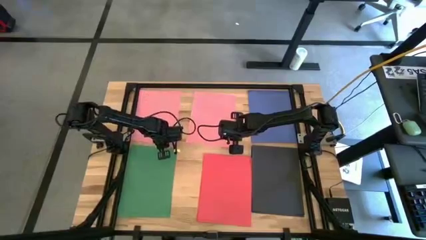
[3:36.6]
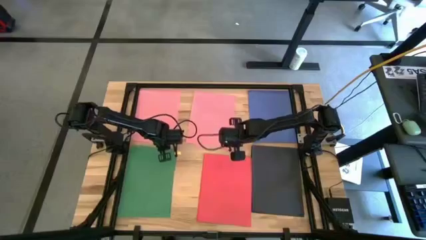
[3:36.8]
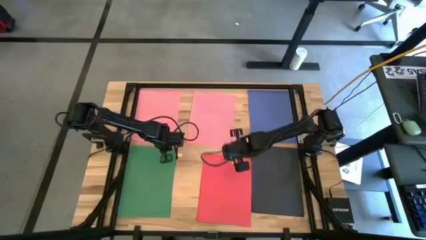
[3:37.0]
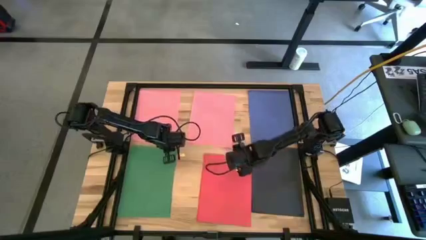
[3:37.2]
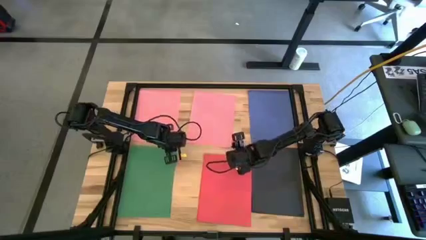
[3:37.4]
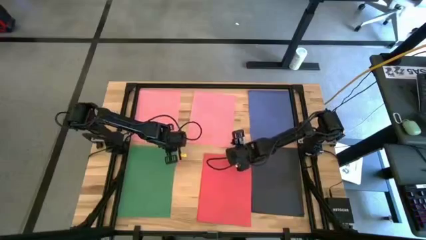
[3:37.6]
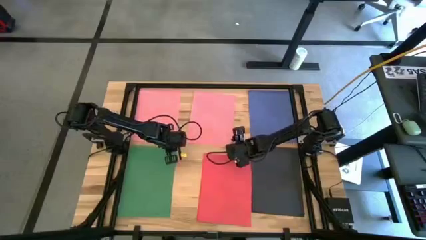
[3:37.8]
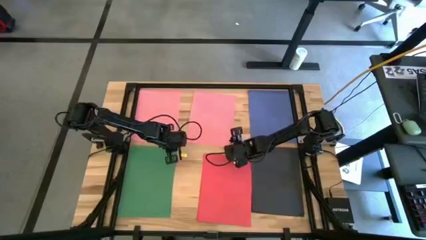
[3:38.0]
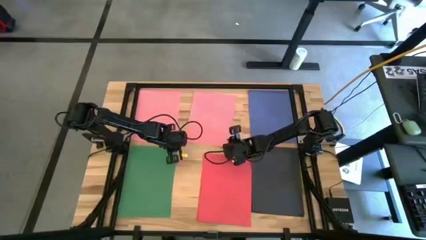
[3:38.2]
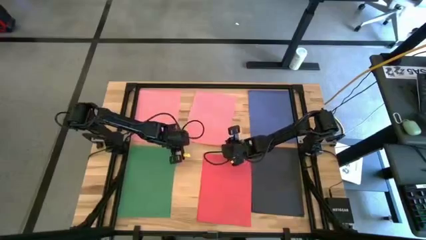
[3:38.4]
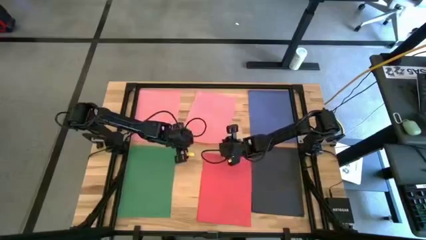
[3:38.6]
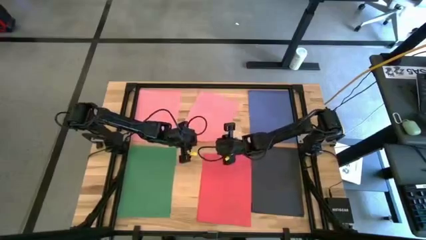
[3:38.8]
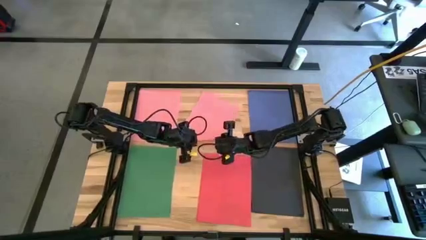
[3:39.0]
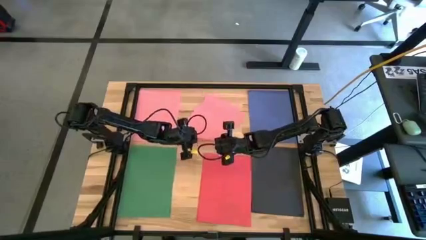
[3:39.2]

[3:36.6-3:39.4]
Task: Organize paper
Stack the pink paper on top of the pink paper

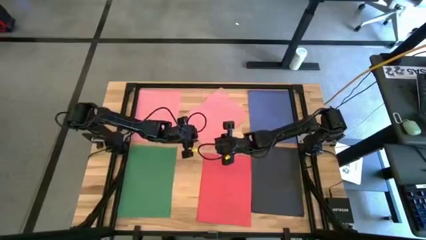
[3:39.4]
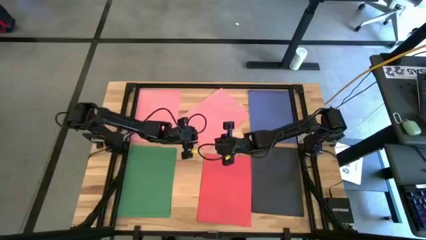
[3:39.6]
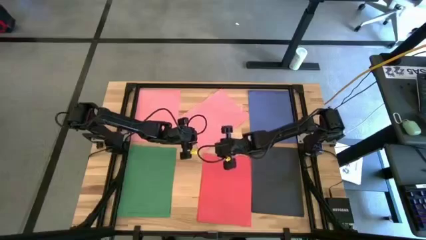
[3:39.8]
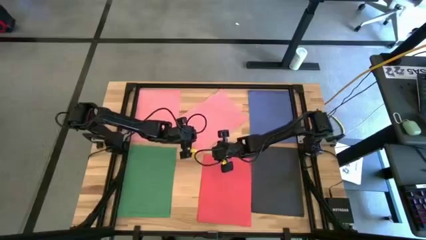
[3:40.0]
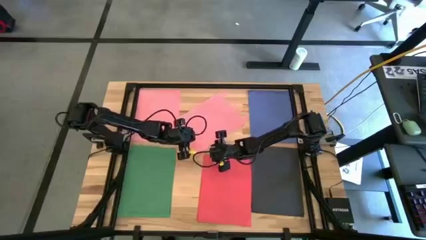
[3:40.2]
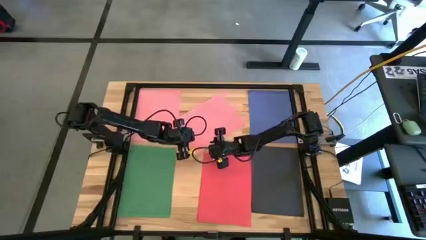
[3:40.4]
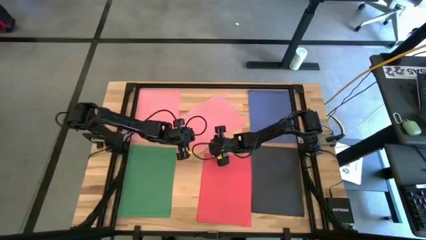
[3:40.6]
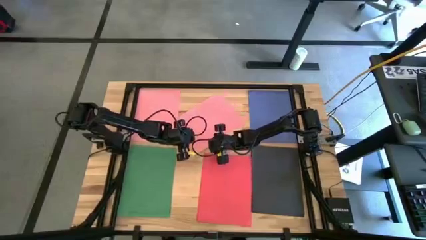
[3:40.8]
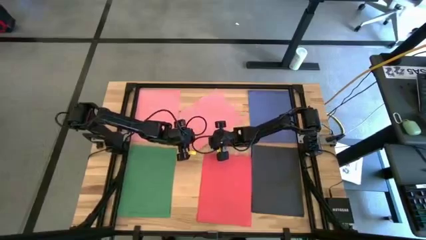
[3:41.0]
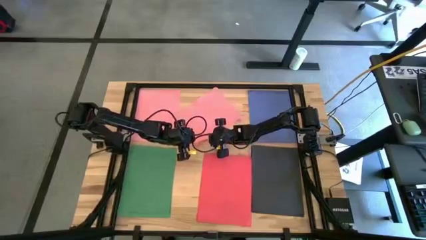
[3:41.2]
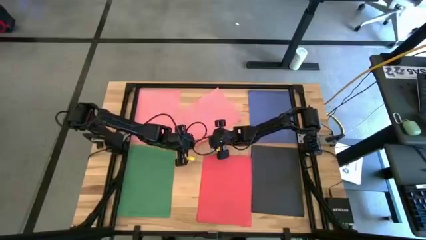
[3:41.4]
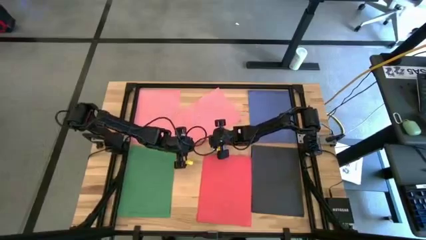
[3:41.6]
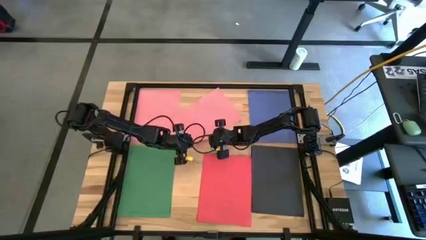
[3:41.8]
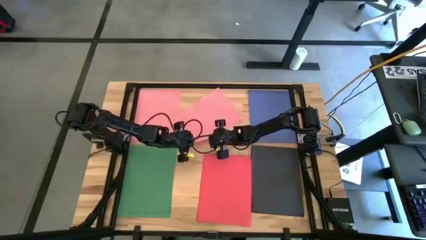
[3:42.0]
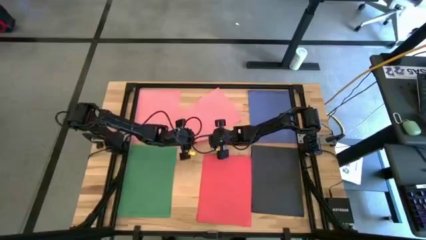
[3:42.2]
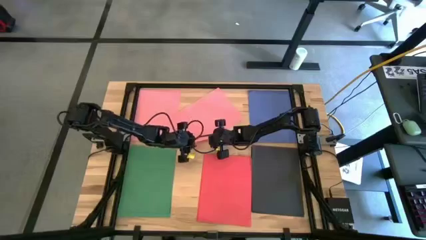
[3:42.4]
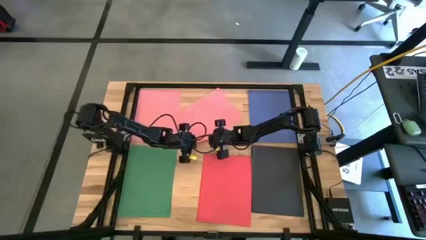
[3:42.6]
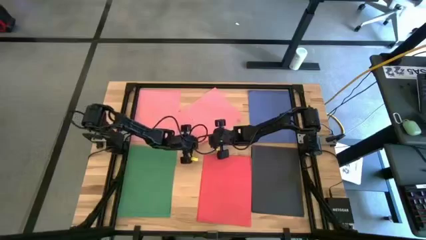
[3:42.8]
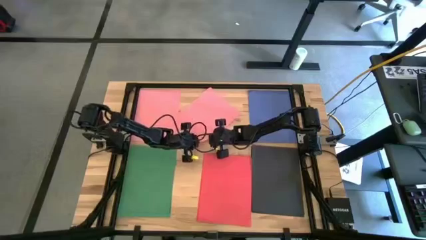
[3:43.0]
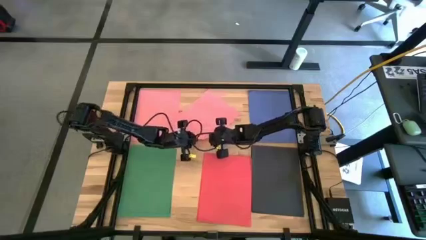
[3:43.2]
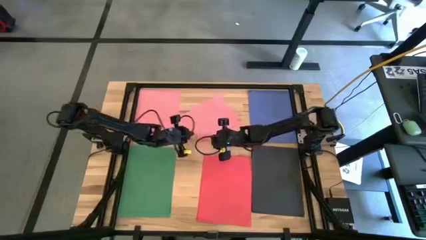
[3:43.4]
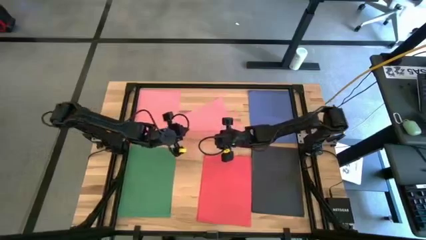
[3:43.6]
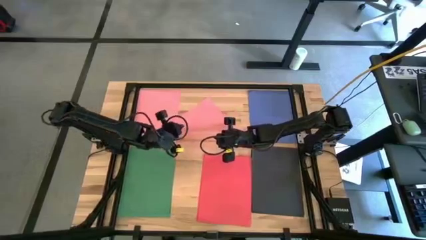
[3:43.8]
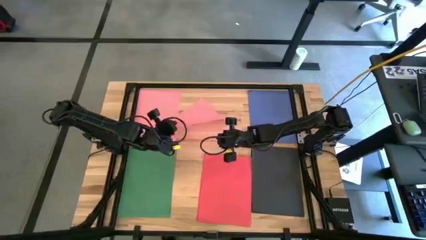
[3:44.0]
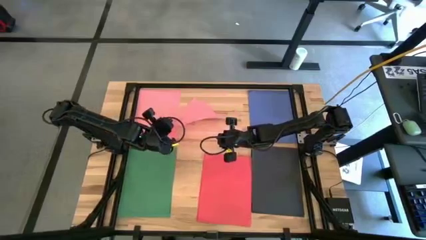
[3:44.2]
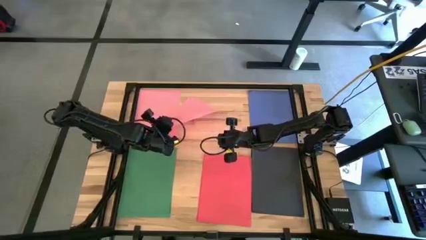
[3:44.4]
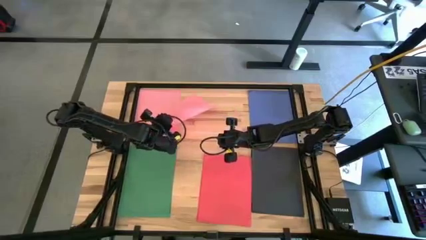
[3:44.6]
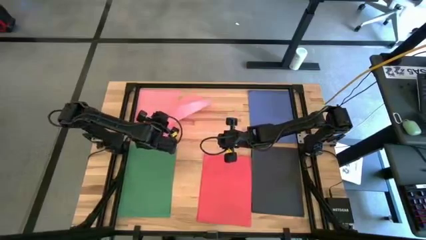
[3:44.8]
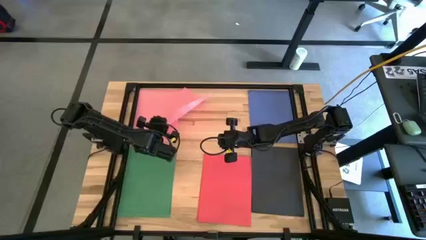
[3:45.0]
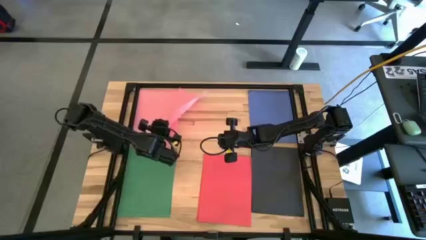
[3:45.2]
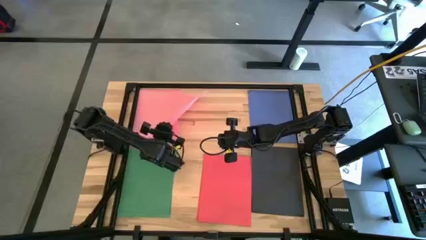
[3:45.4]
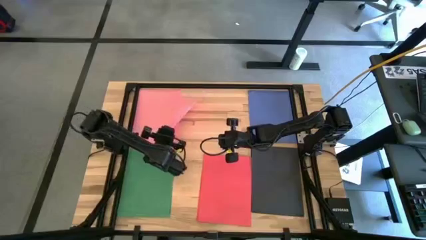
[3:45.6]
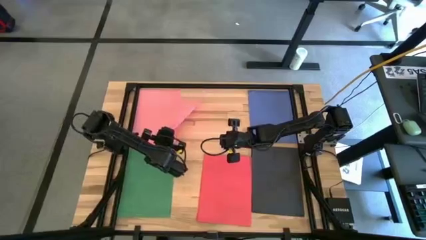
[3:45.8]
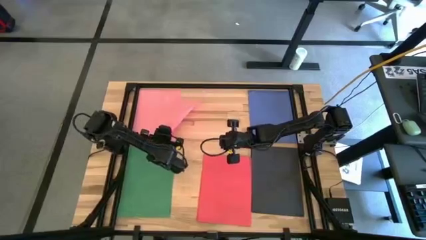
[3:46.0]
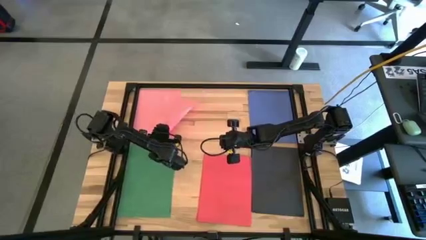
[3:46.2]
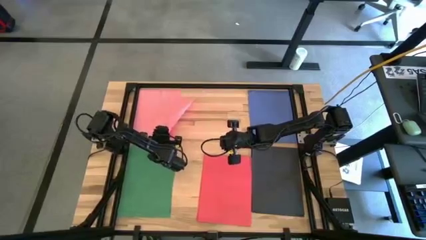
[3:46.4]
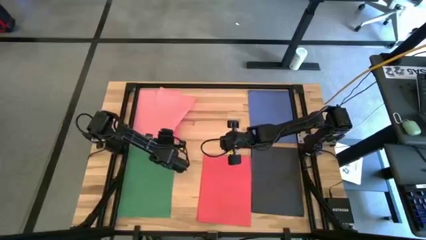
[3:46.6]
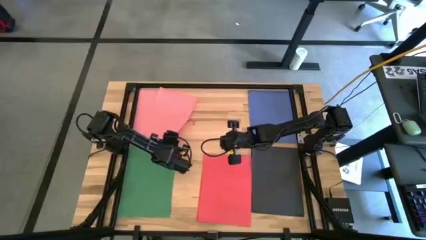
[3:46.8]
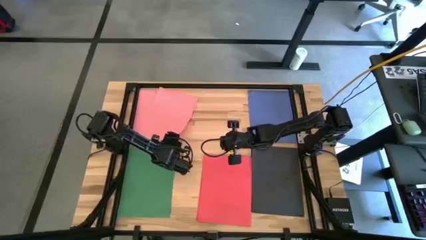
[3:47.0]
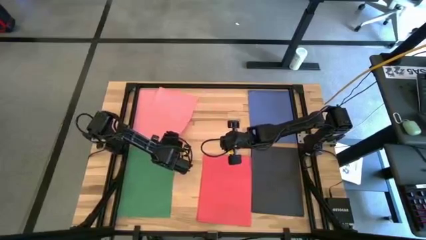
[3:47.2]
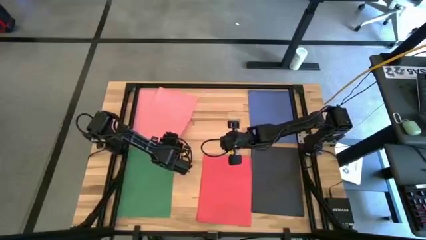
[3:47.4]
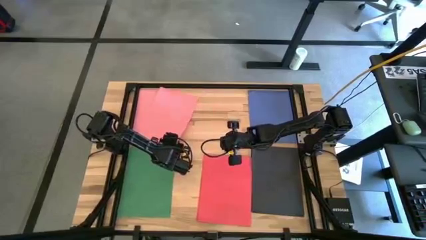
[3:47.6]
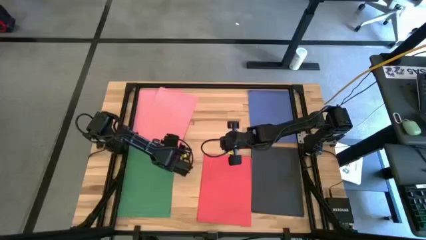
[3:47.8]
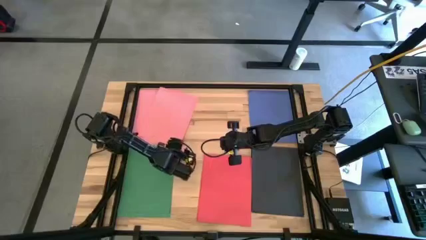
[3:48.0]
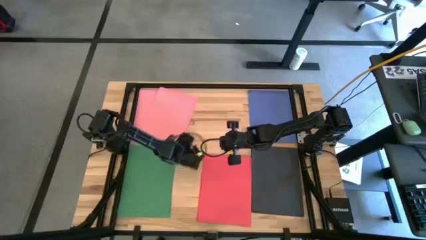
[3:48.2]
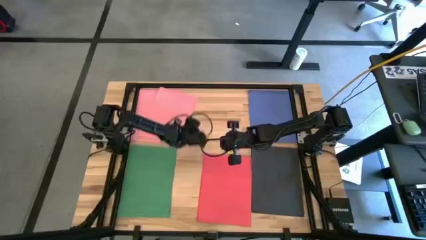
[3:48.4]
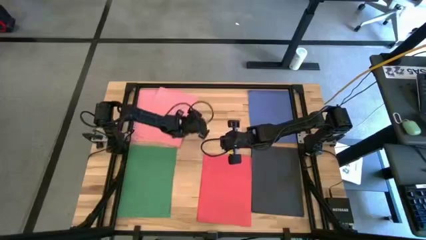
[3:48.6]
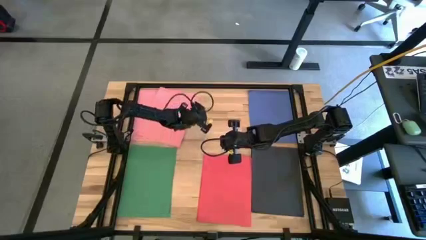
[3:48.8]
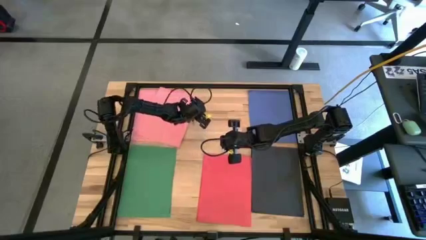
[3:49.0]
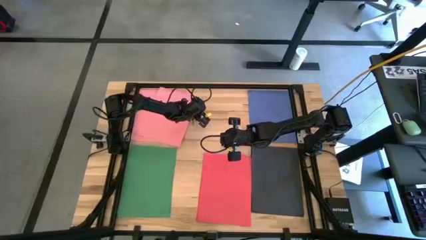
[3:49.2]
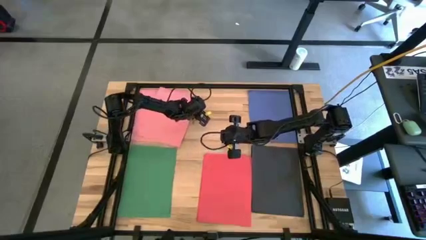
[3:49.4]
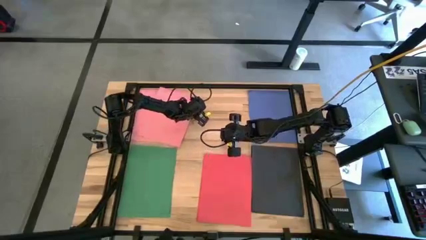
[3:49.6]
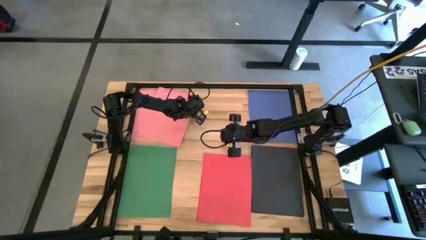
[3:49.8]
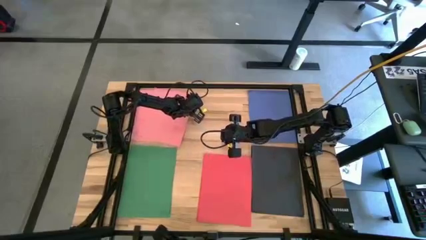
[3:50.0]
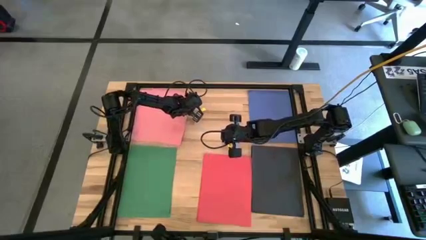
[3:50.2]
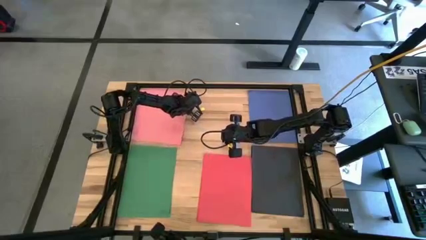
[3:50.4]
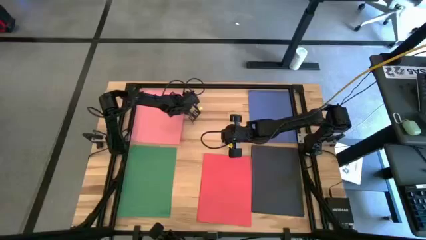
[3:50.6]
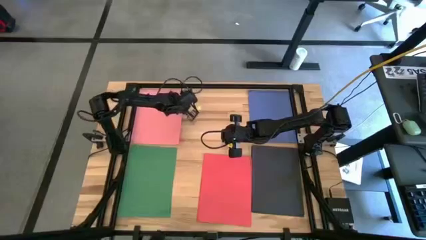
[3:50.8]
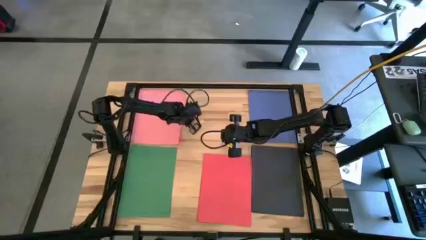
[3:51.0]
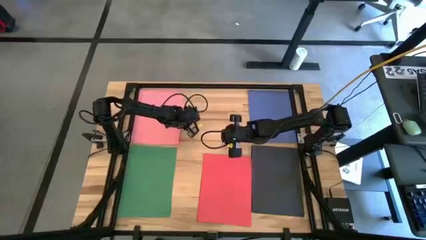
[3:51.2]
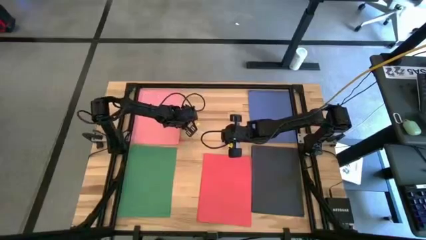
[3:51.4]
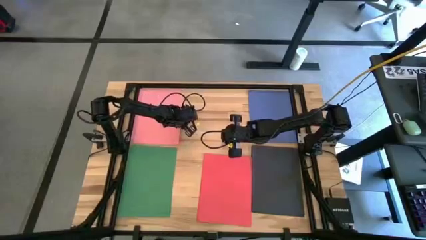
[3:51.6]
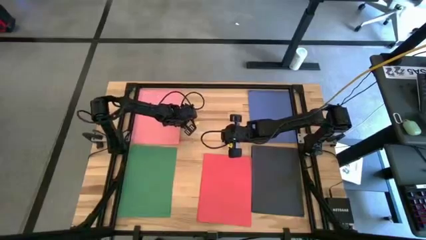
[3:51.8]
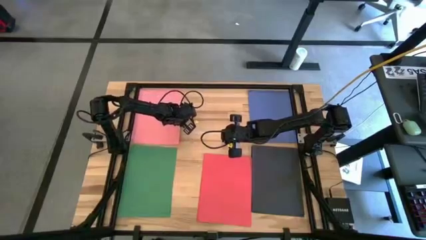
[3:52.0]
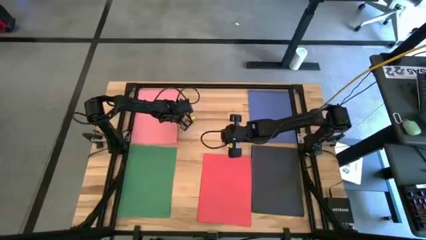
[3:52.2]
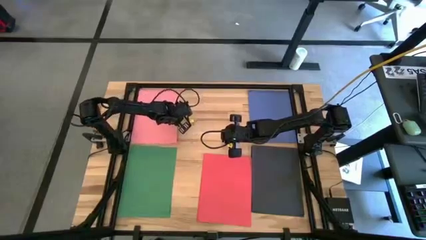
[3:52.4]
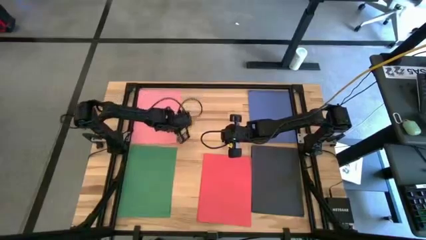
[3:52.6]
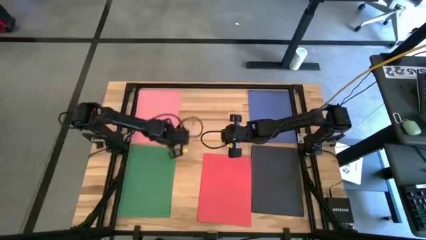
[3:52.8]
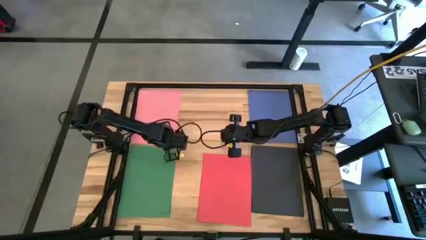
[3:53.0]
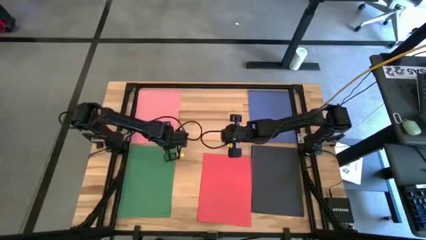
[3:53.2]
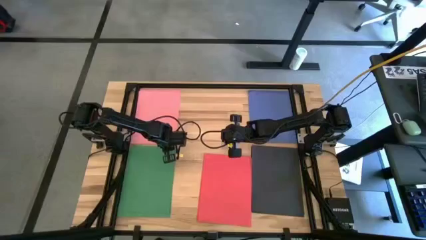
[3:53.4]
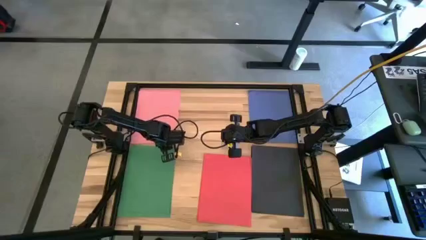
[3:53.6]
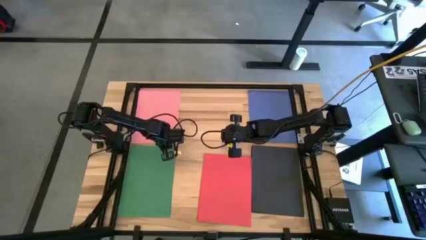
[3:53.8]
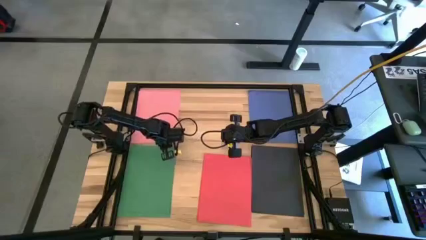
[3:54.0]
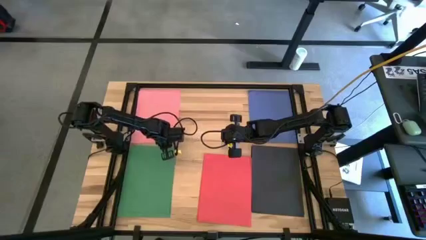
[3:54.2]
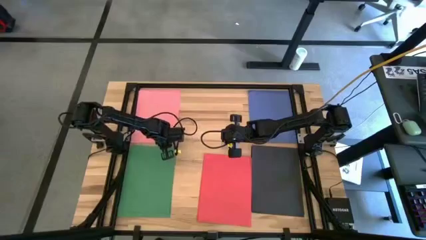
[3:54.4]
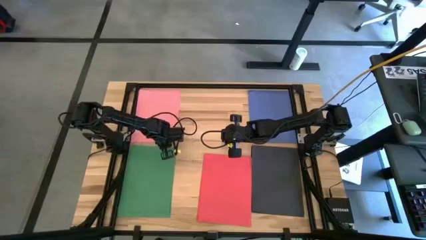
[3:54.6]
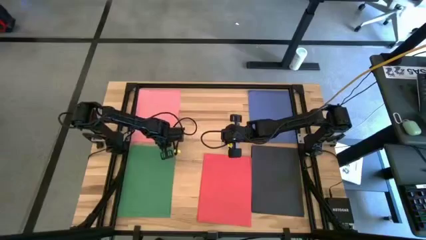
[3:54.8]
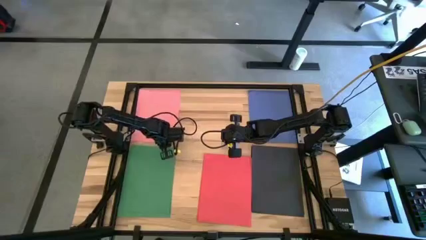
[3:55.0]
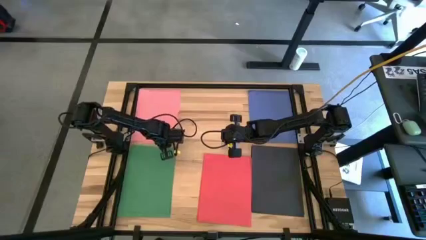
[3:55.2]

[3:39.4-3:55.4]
Stack the pink paper on top of the pink paper
